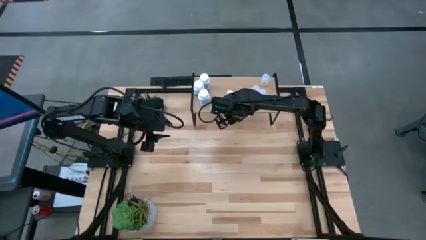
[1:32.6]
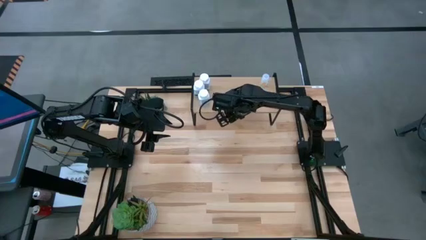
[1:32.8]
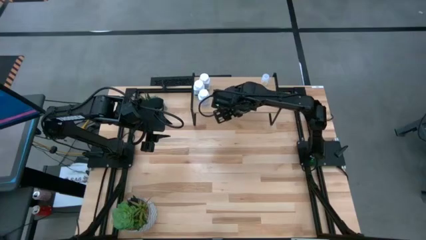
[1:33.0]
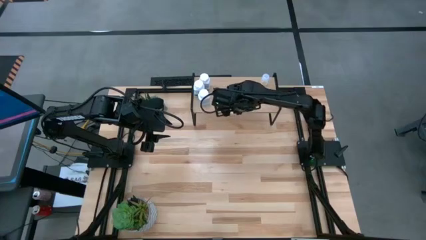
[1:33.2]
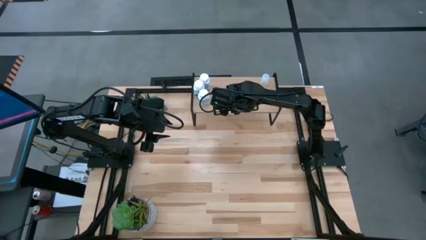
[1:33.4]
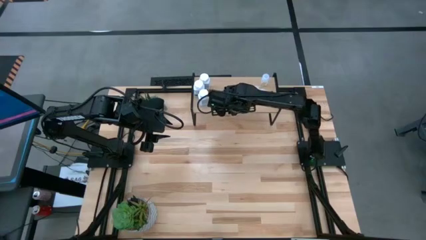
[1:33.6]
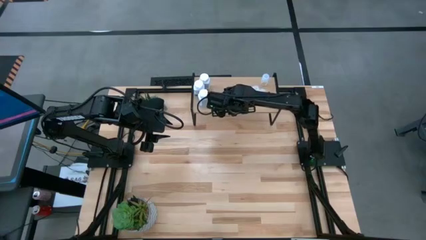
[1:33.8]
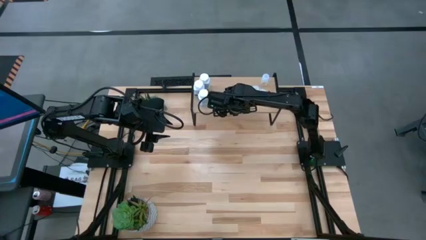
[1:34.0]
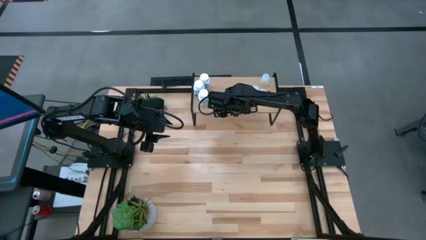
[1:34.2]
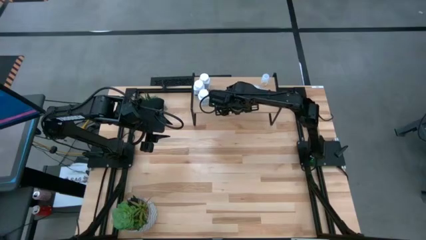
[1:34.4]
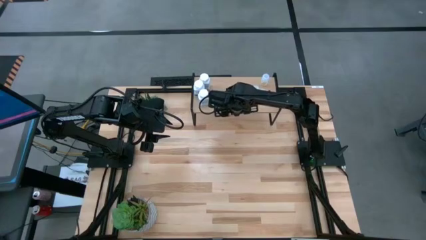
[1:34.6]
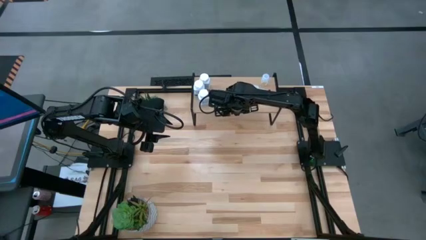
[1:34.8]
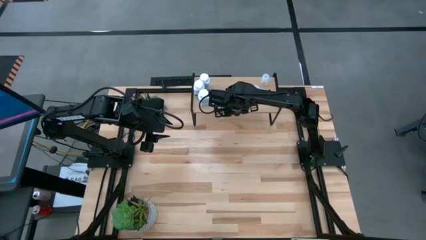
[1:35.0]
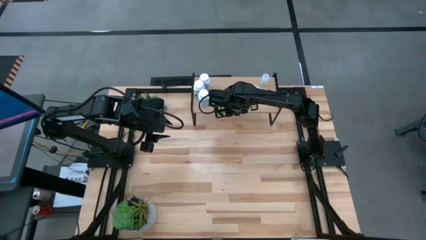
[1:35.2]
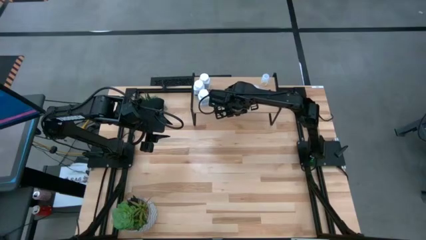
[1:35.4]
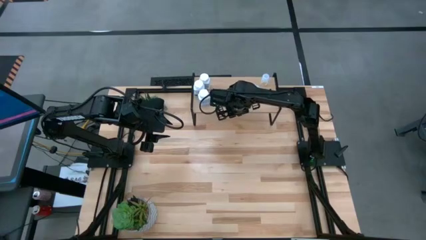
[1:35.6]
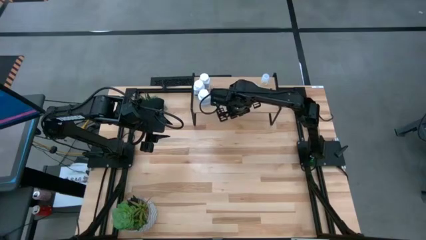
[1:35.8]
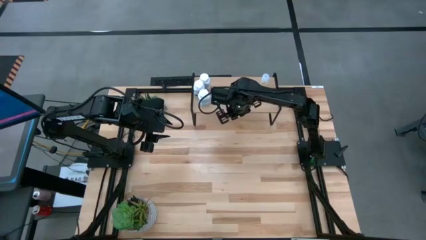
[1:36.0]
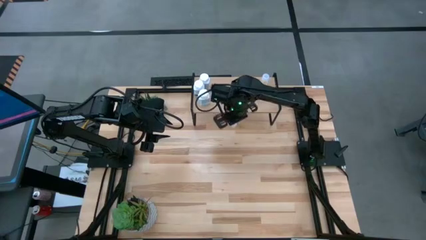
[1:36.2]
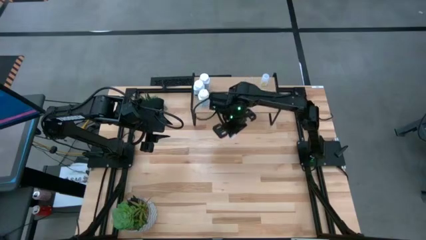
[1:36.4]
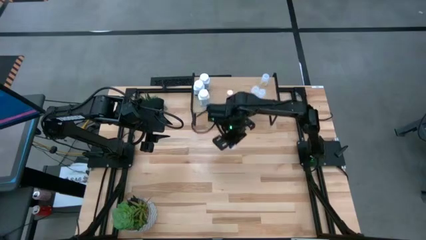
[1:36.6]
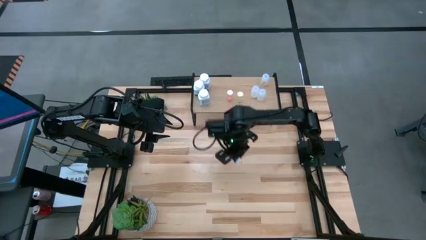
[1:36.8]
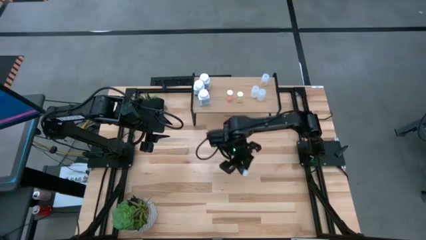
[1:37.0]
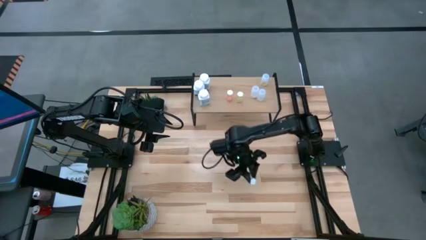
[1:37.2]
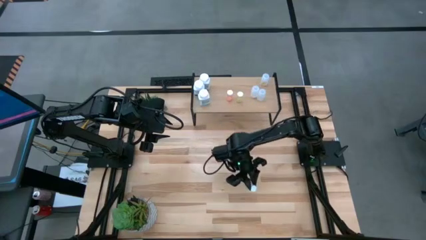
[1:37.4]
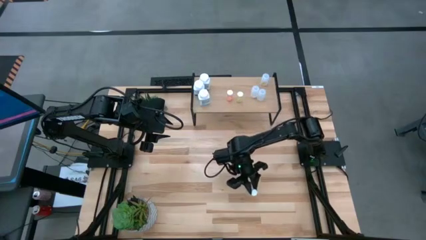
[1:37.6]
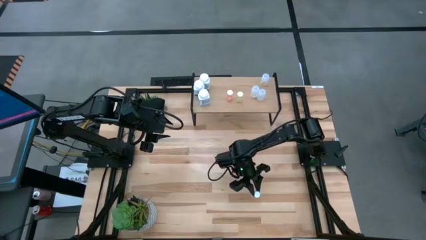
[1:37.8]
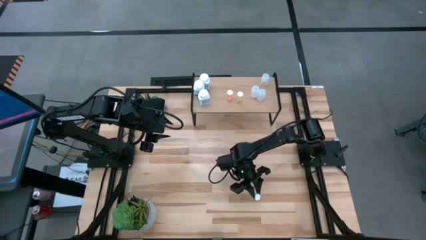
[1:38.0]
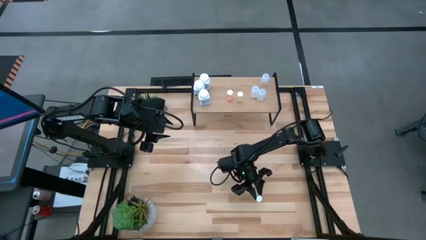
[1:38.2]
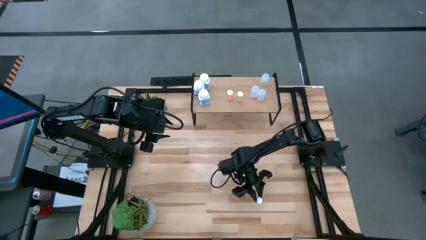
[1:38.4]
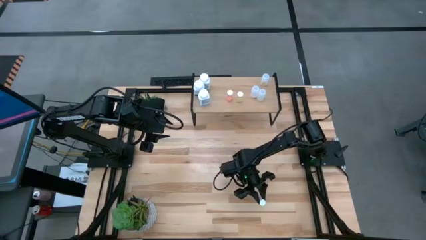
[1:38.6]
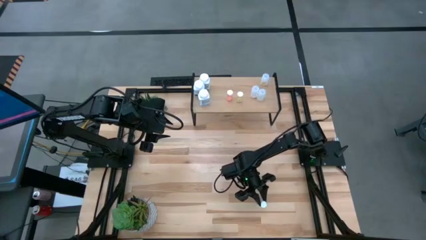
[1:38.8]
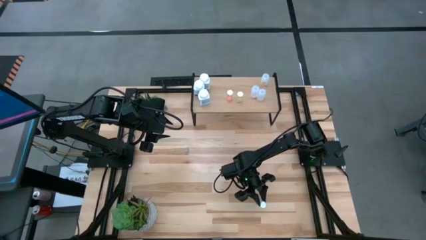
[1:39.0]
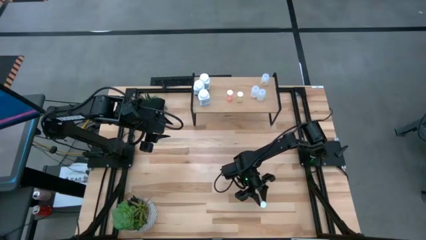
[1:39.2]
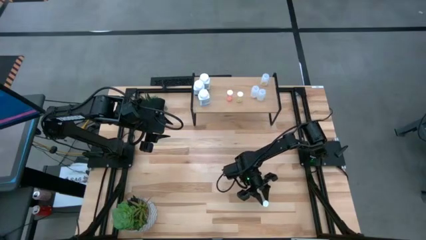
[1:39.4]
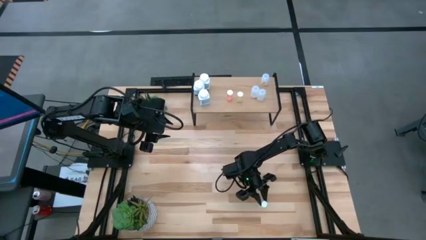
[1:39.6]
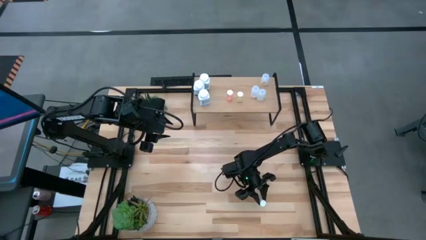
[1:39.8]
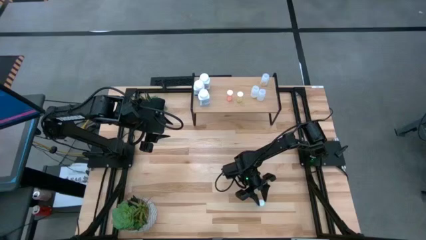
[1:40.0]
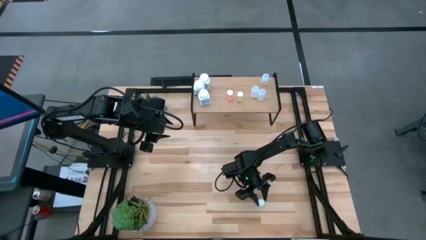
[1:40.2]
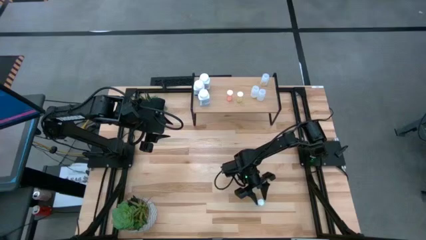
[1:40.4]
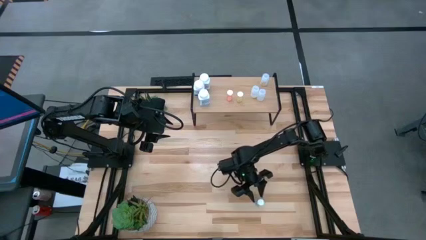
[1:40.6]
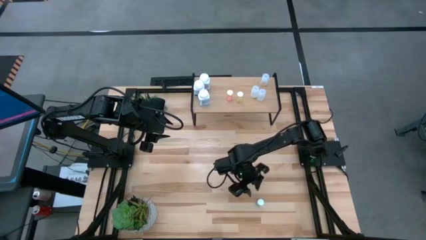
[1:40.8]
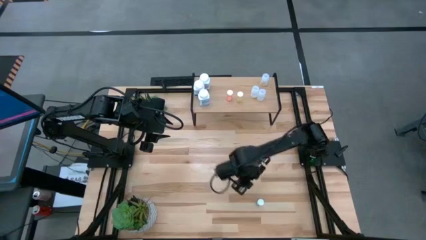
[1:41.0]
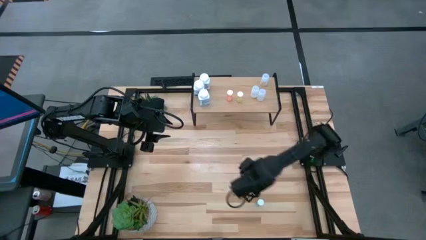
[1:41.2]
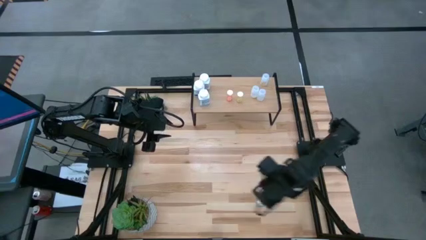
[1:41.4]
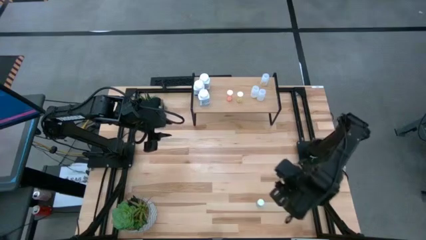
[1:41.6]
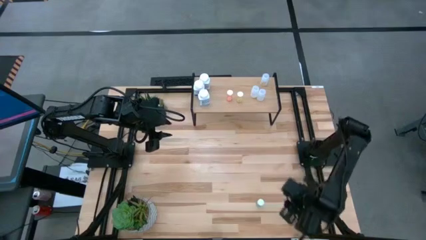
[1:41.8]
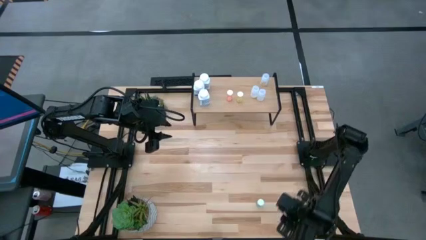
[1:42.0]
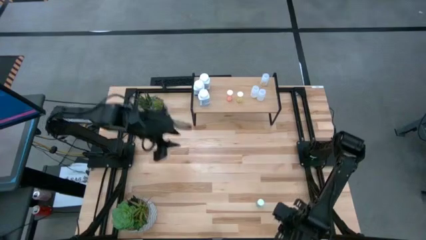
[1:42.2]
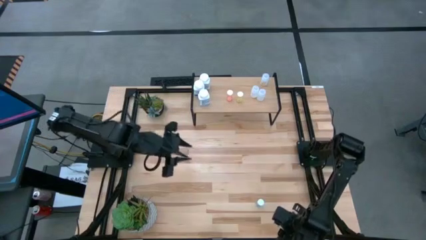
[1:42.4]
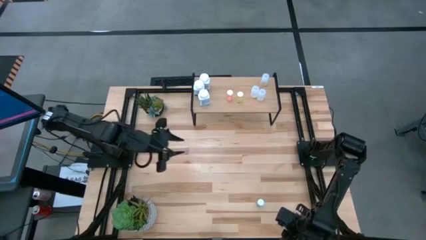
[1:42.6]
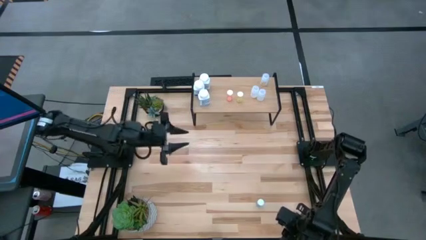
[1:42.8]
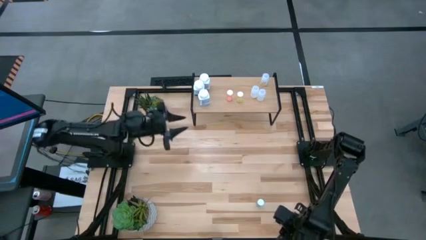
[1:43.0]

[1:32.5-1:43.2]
Task: Pick and place medicine bottles onto shelf by color
Put the blue pill bottle on the shelf
